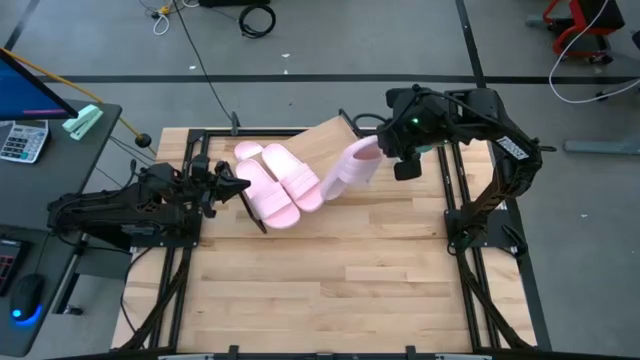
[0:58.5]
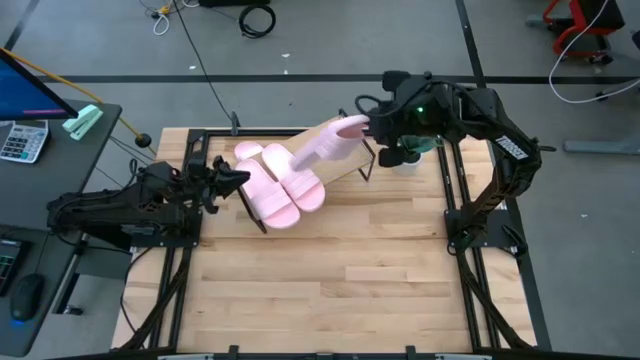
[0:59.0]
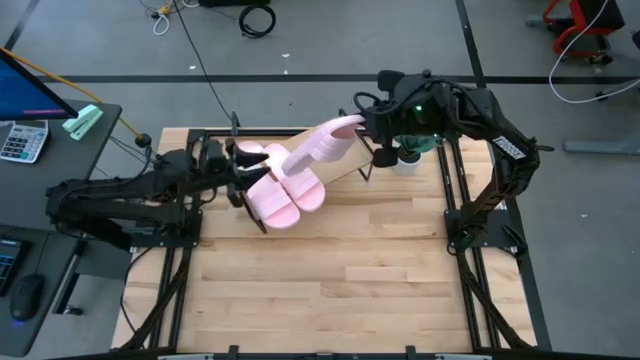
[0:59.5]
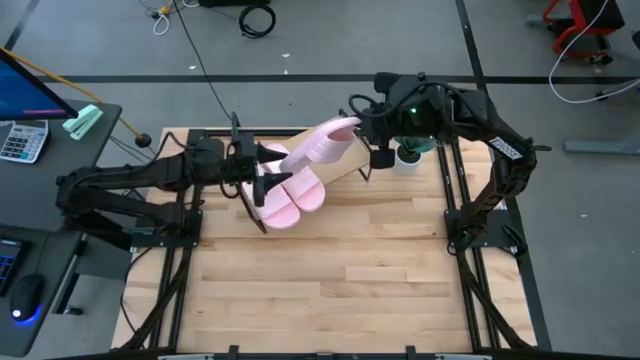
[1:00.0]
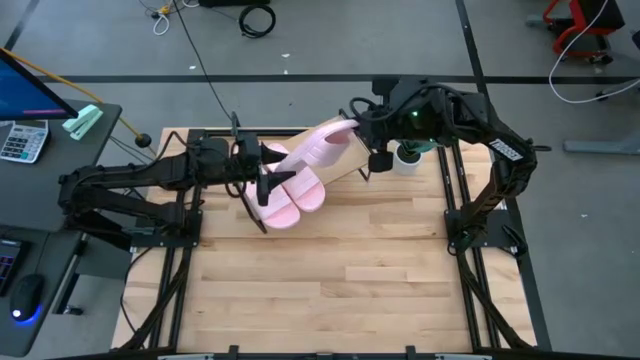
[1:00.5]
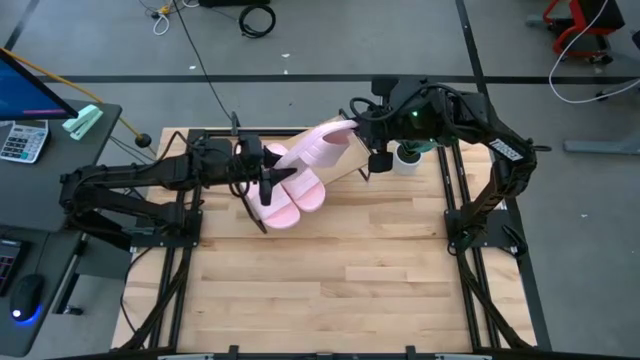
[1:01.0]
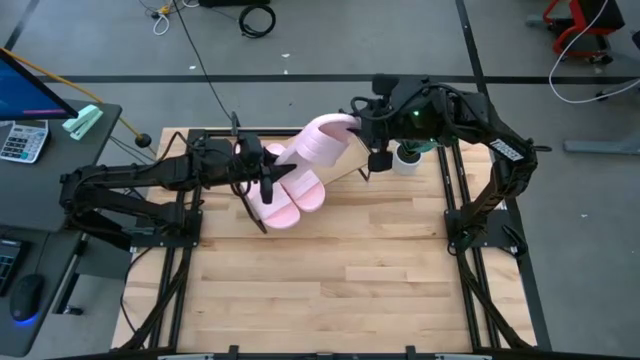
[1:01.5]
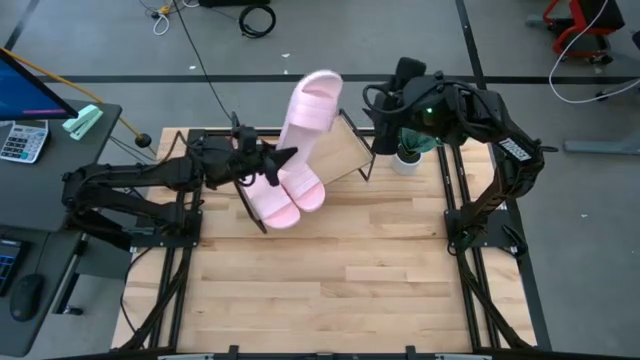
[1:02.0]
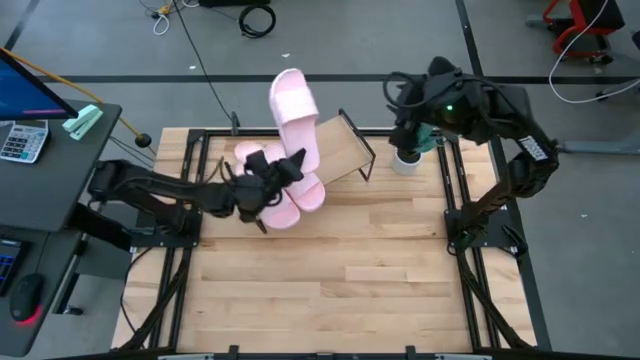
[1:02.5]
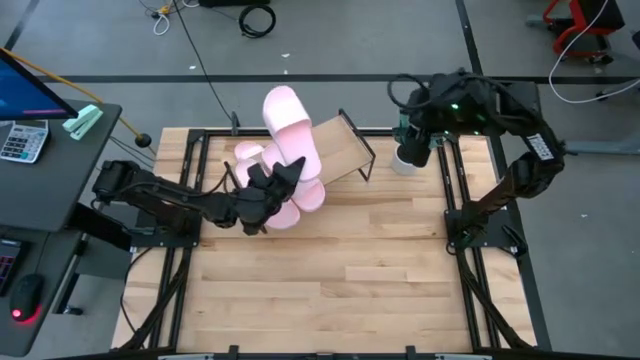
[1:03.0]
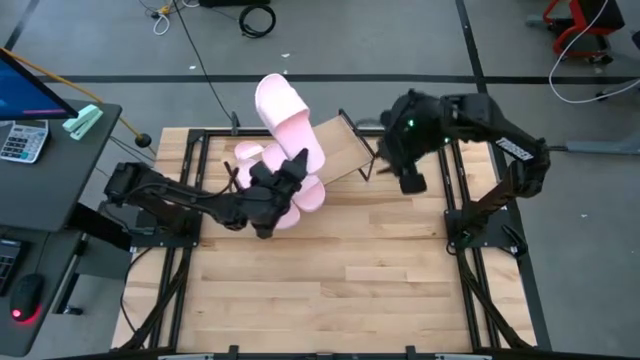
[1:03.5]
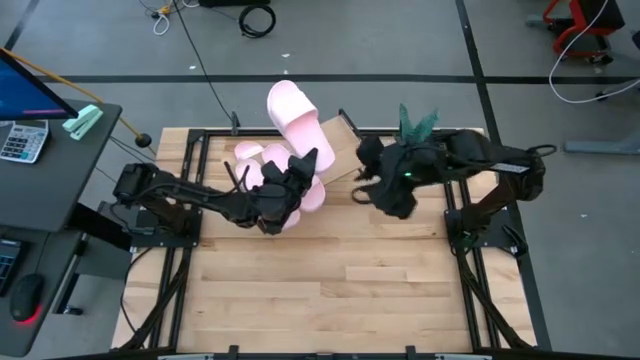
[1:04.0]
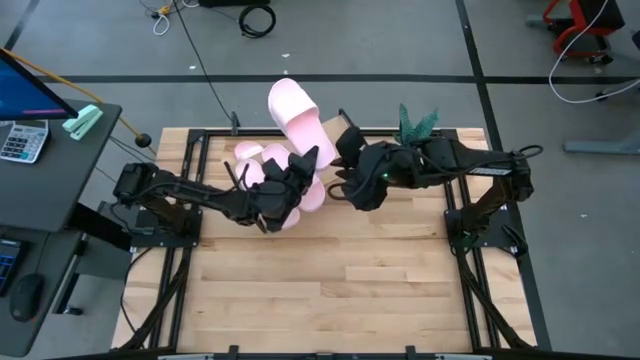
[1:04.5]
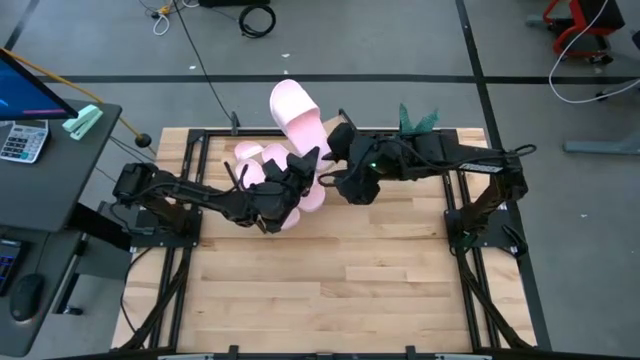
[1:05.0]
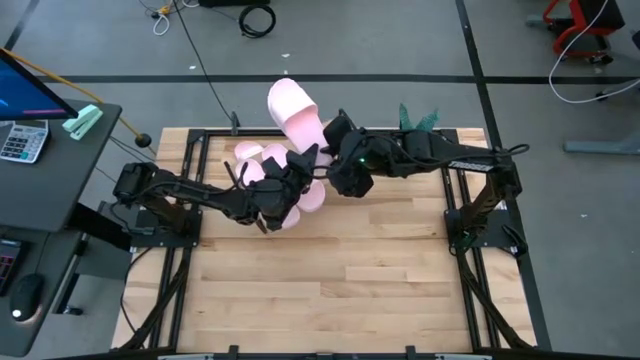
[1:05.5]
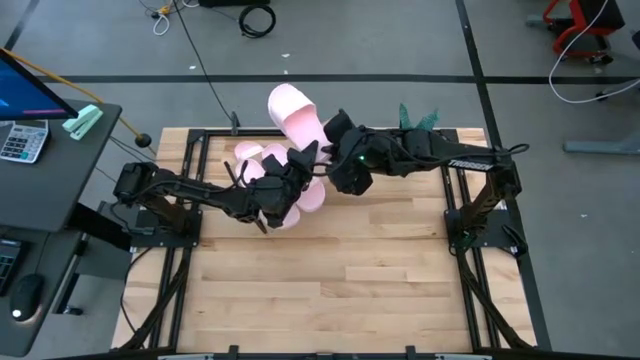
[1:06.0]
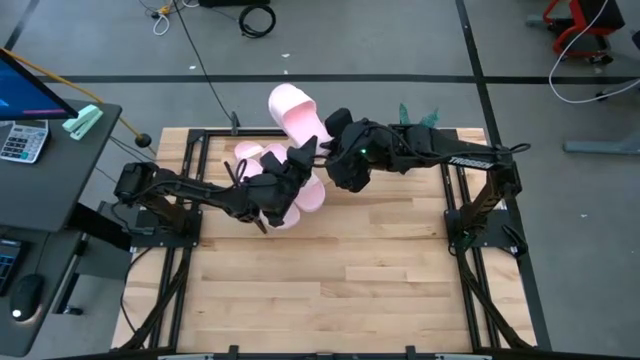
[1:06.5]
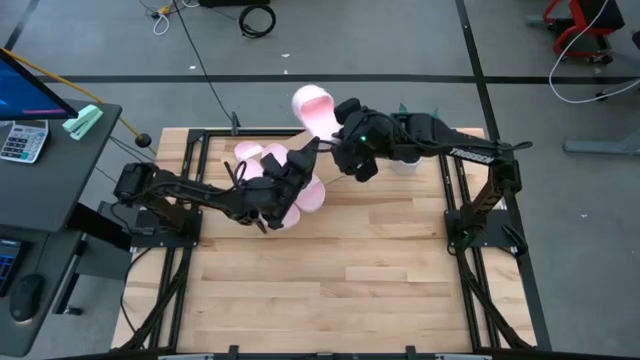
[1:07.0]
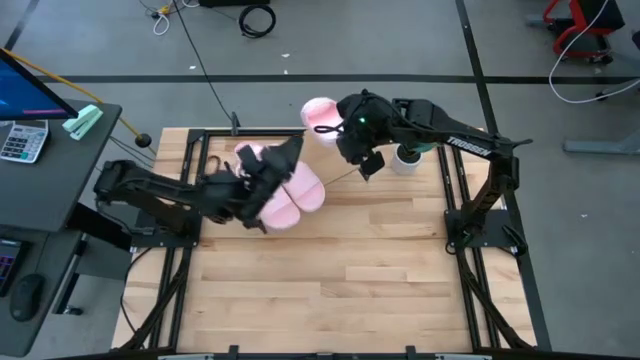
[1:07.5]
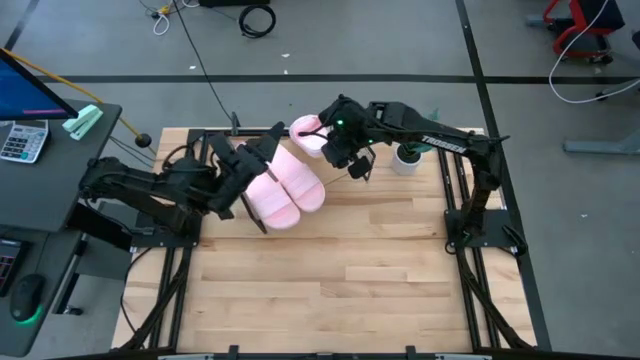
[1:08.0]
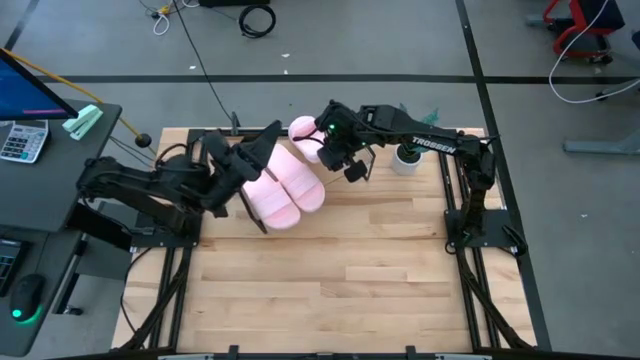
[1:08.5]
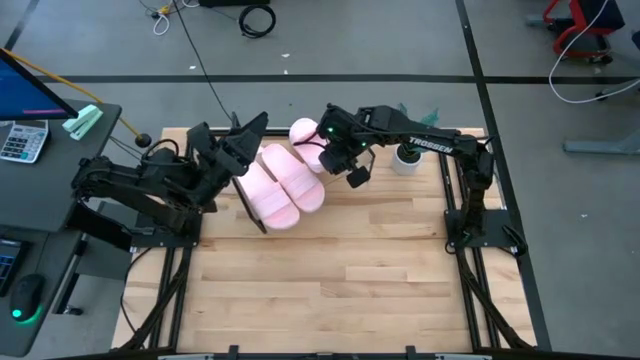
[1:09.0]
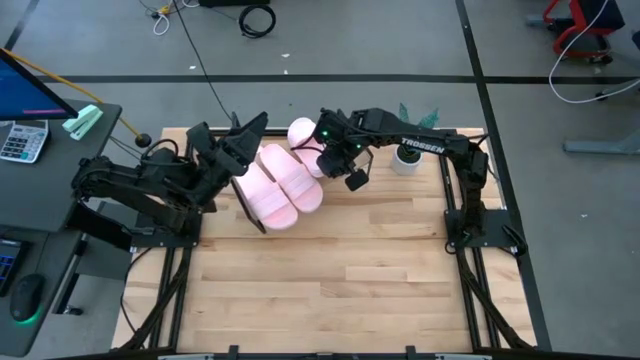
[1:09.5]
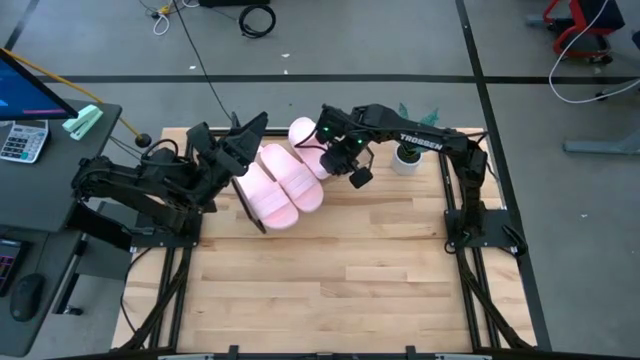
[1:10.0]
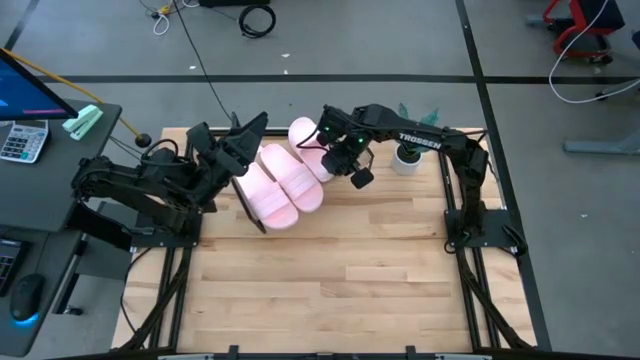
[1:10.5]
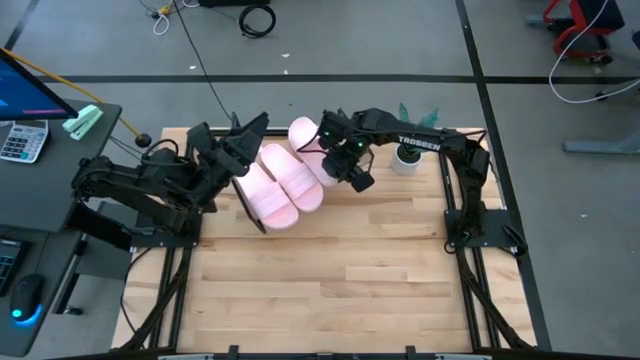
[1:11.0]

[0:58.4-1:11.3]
Task: Pick and place slides into the shelf
Put the pink slipper on the shelf

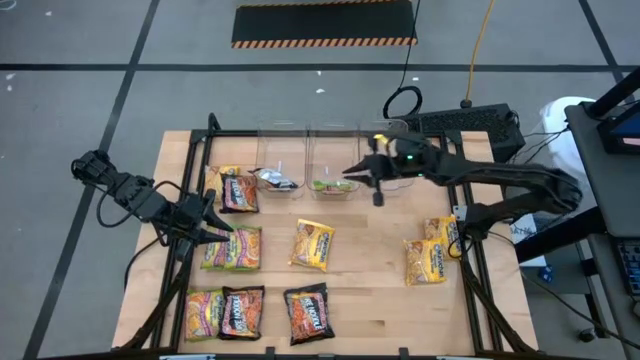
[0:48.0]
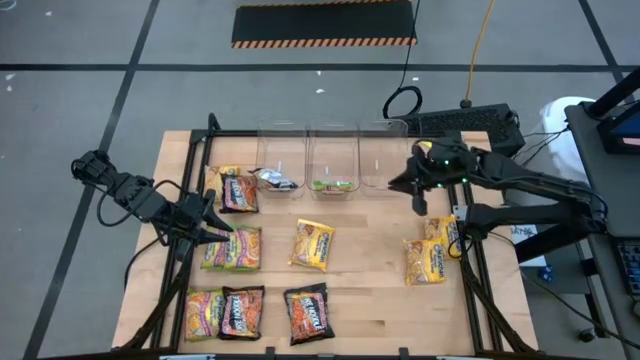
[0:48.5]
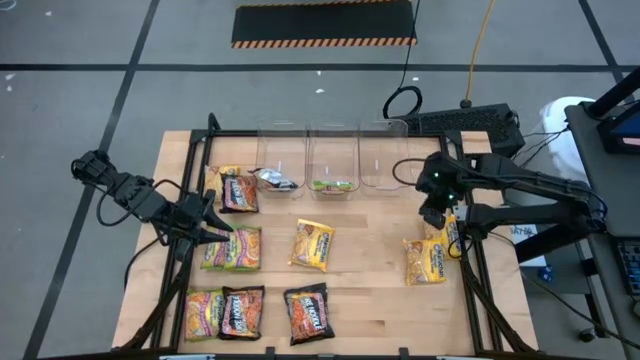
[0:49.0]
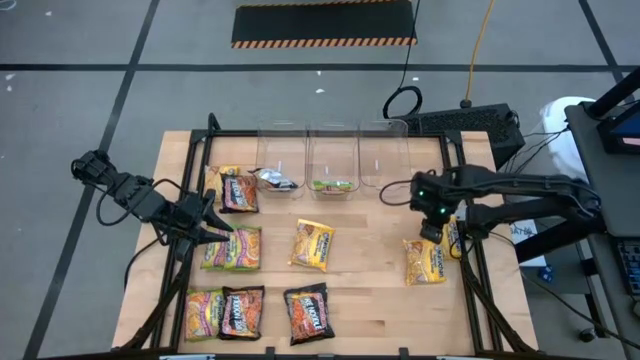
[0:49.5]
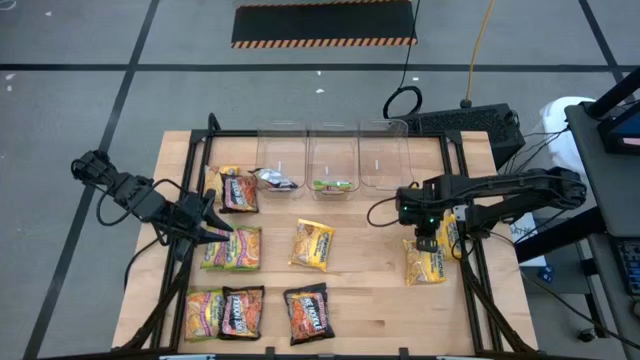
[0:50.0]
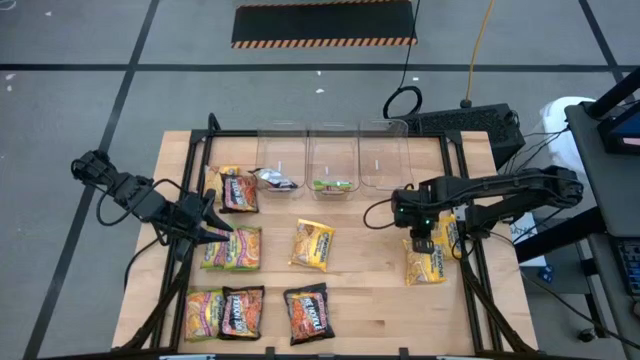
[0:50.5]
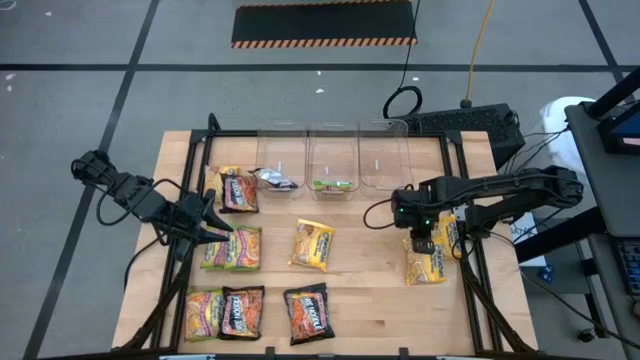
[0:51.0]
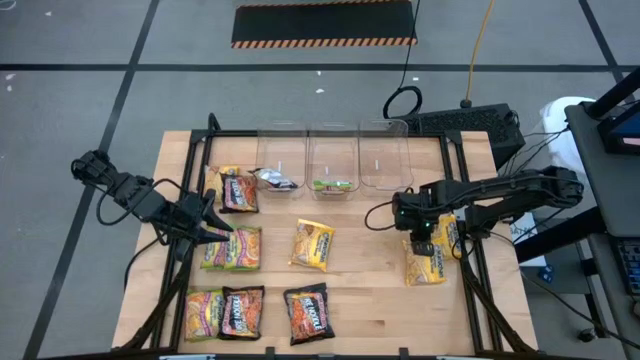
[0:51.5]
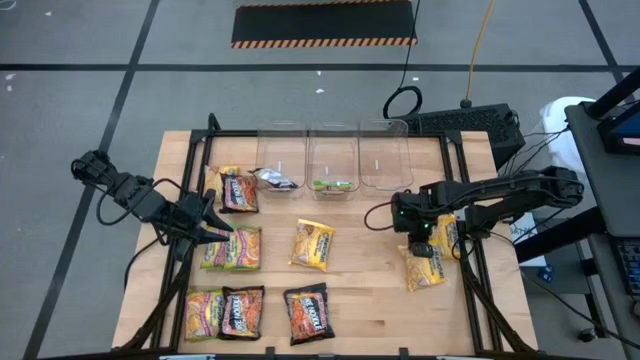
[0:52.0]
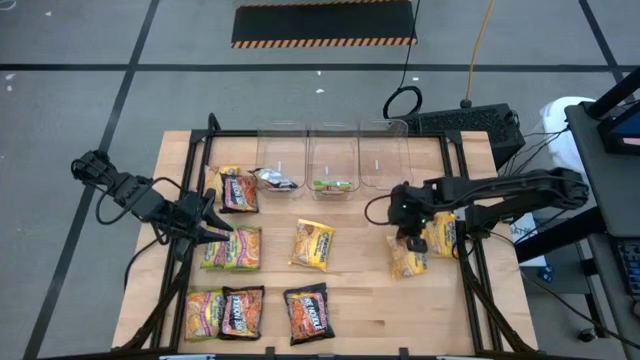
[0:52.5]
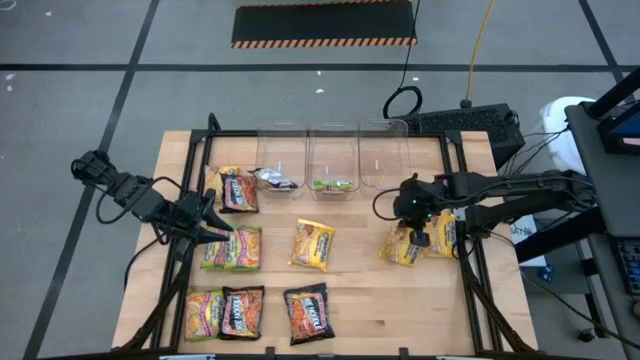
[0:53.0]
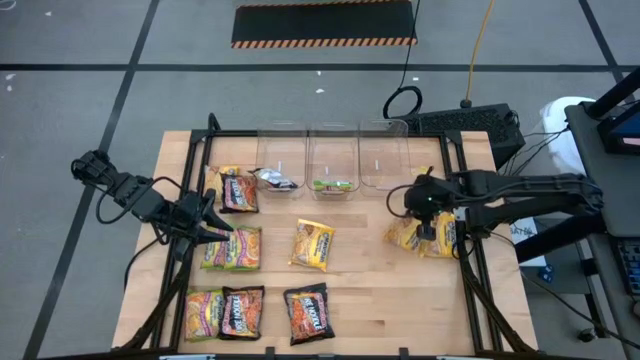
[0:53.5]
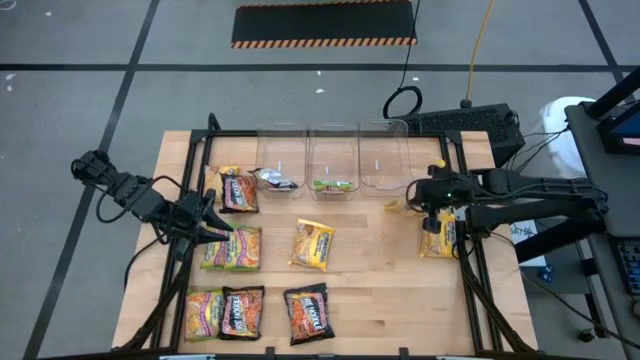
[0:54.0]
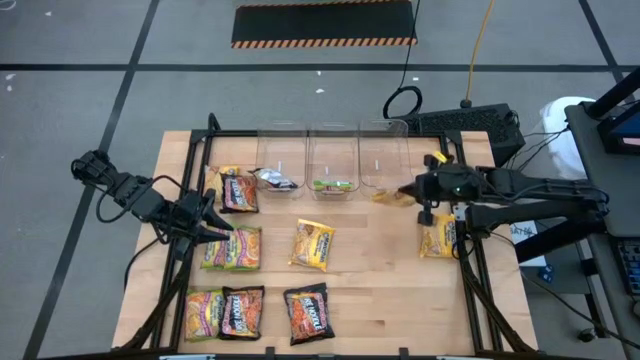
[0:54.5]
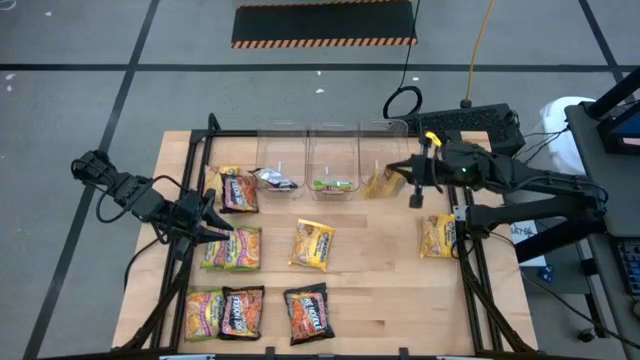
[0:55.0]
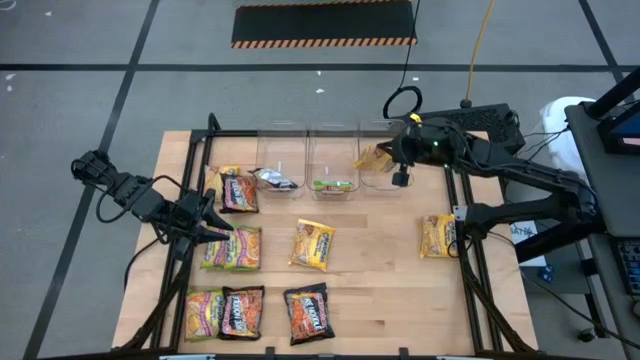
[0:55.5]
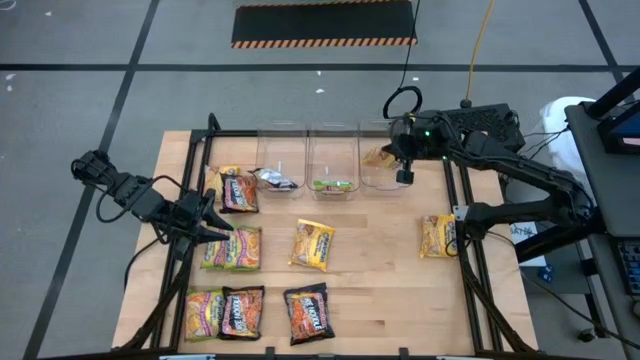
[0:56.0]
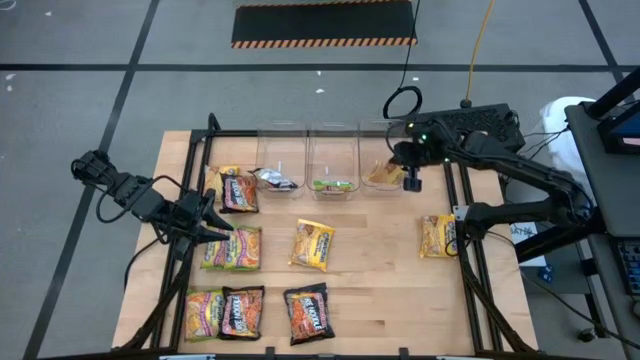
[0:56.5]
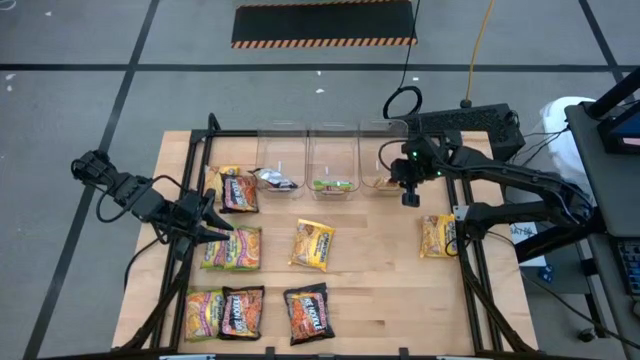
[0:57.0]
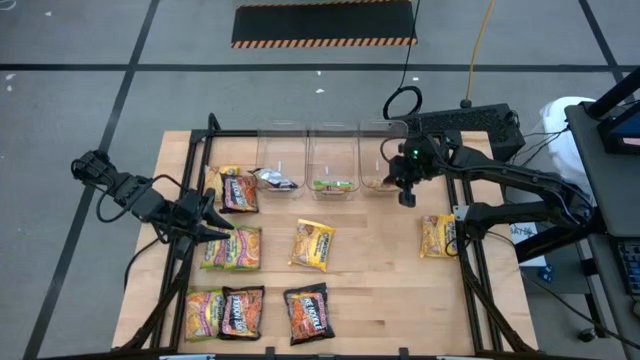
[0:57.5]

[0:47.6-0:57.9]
Task: Sort Maruchan noodles
Put the yellow noodle pack into the right transparent bin
